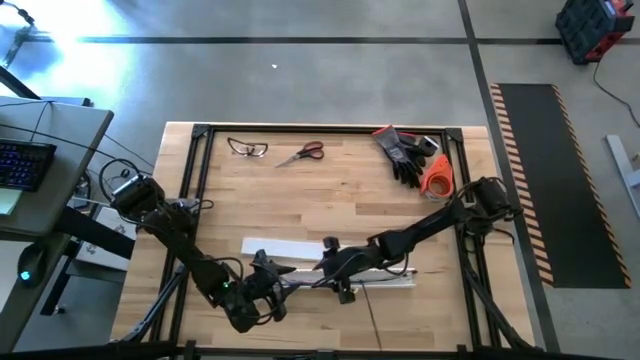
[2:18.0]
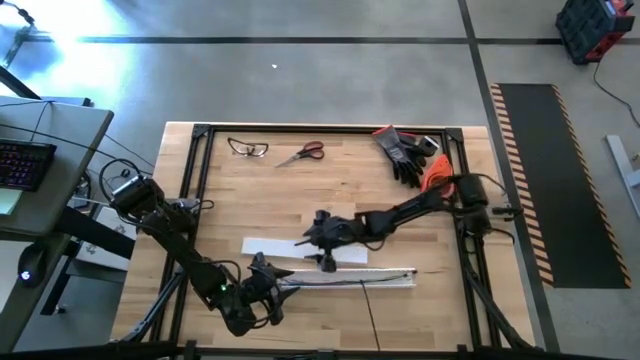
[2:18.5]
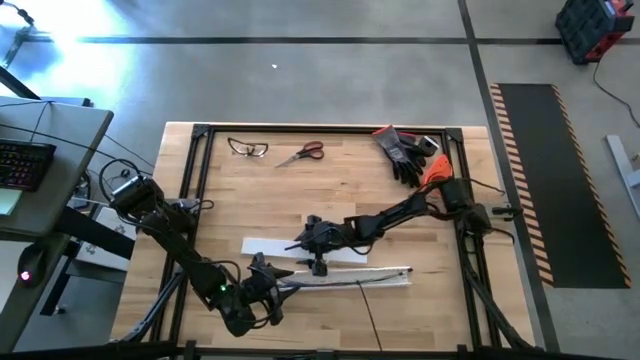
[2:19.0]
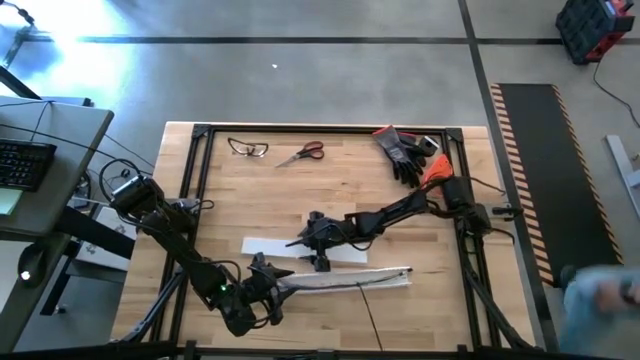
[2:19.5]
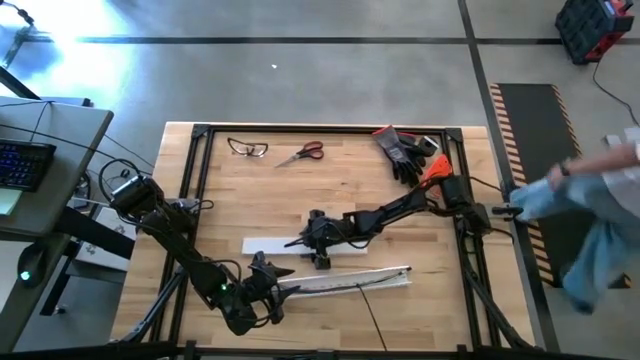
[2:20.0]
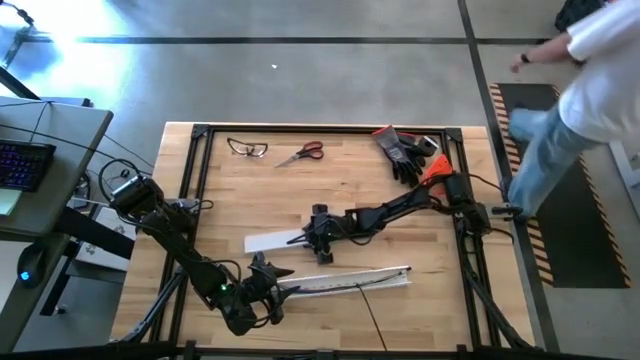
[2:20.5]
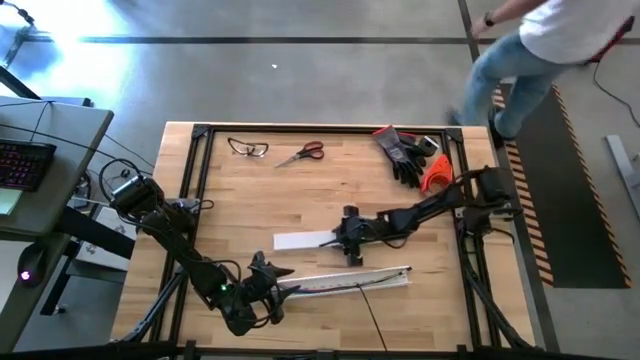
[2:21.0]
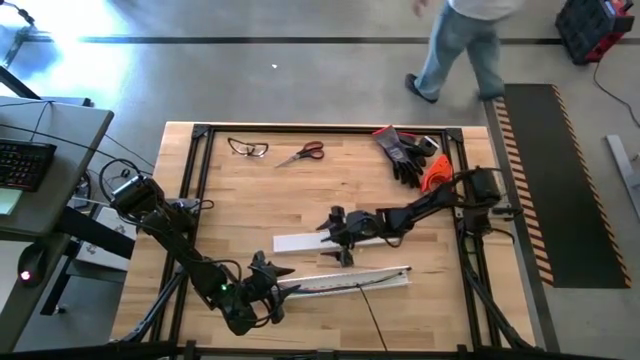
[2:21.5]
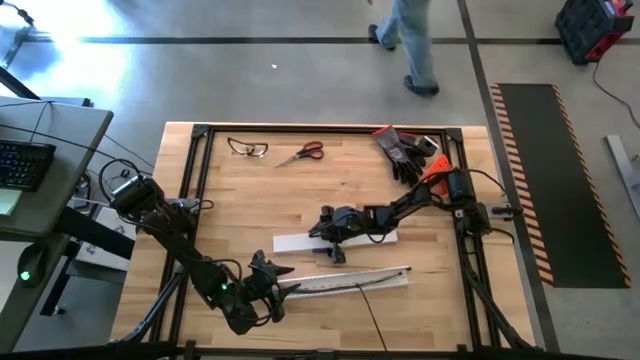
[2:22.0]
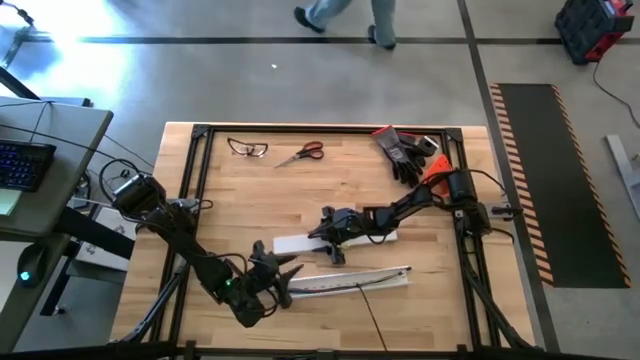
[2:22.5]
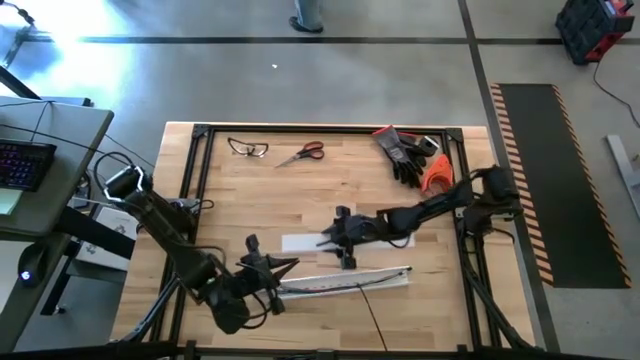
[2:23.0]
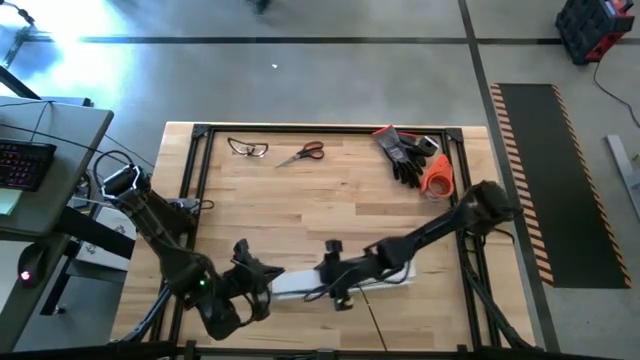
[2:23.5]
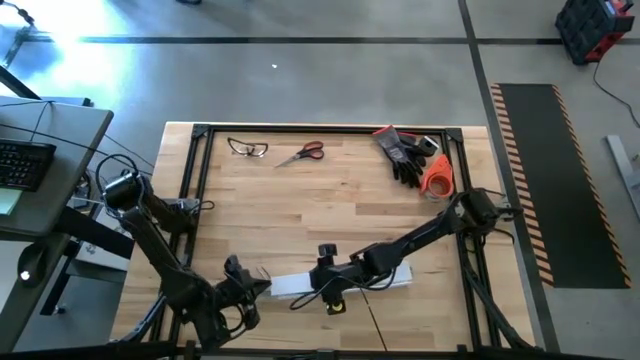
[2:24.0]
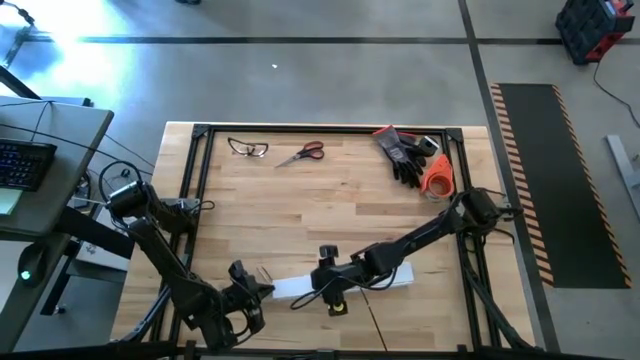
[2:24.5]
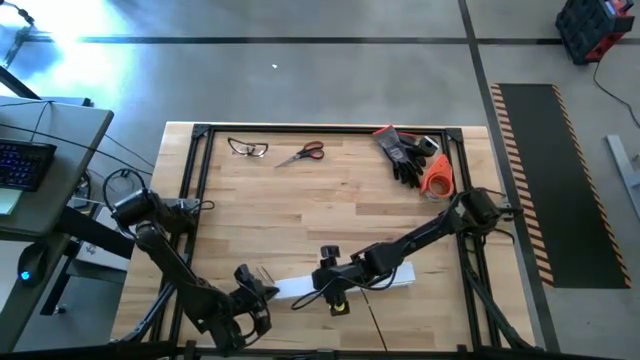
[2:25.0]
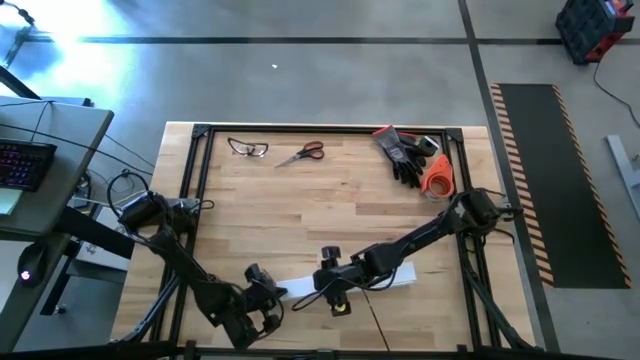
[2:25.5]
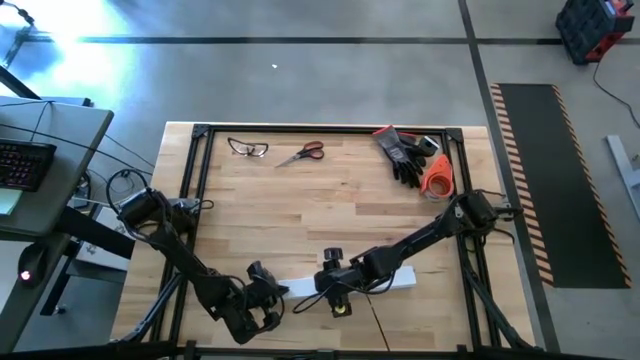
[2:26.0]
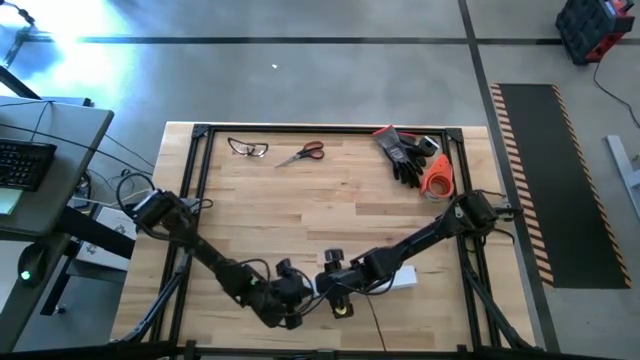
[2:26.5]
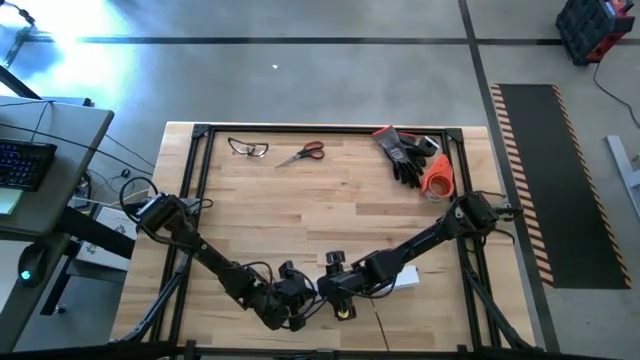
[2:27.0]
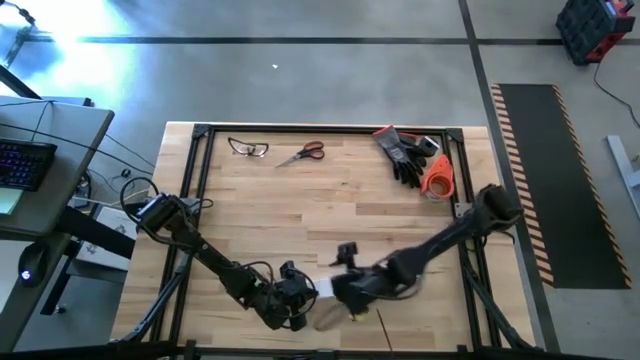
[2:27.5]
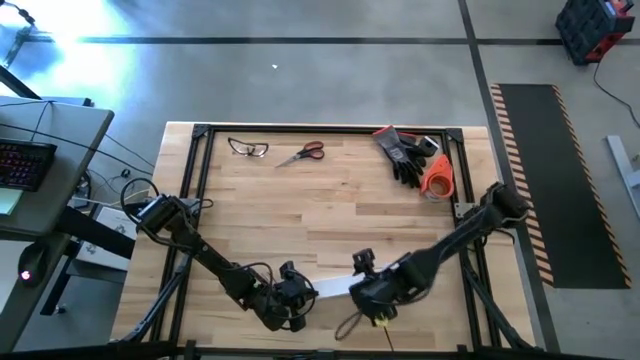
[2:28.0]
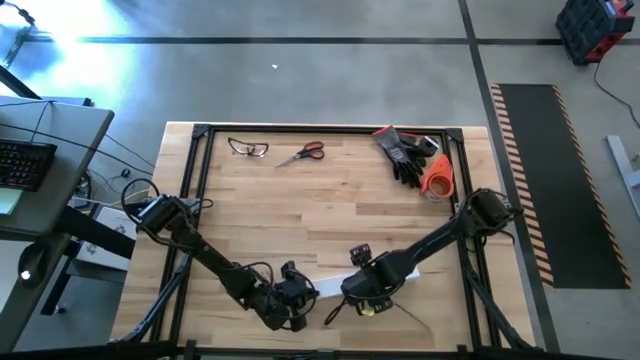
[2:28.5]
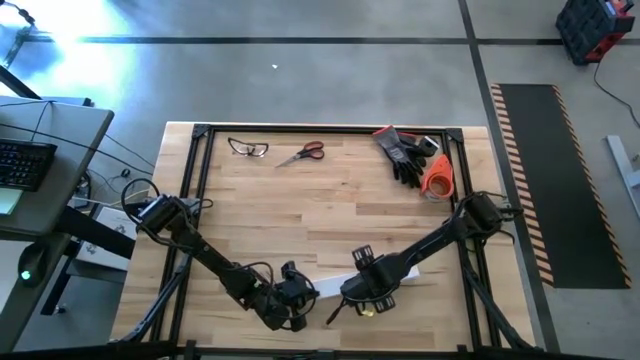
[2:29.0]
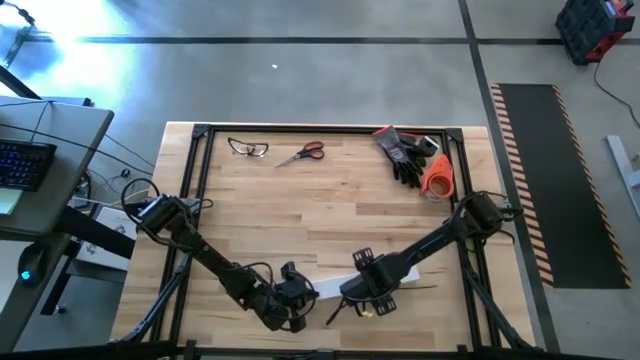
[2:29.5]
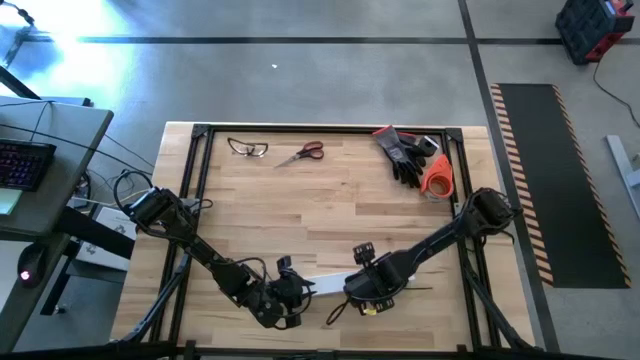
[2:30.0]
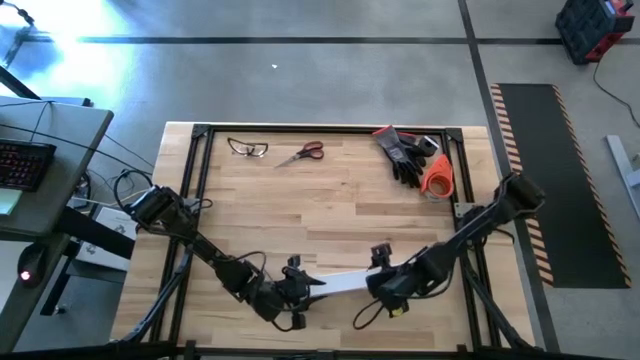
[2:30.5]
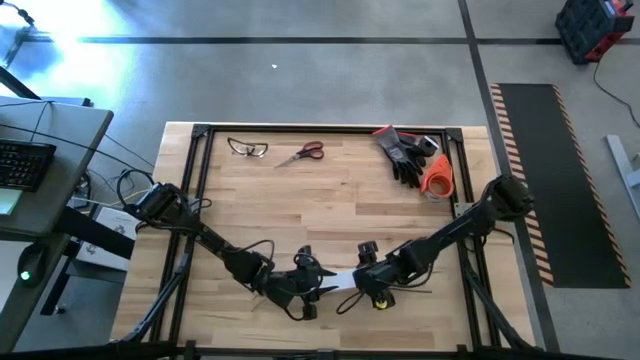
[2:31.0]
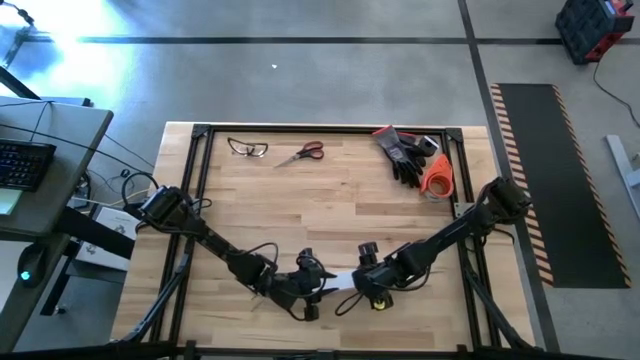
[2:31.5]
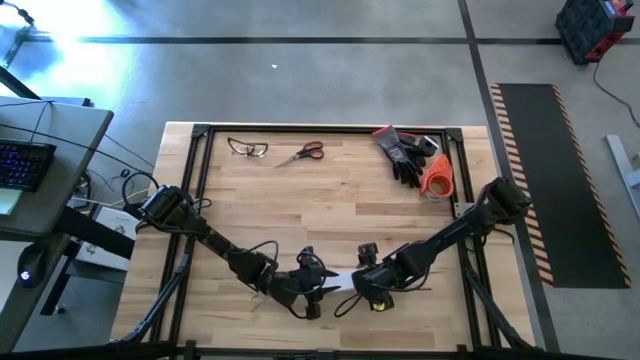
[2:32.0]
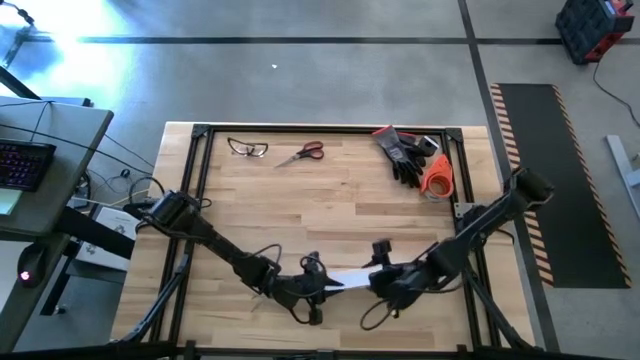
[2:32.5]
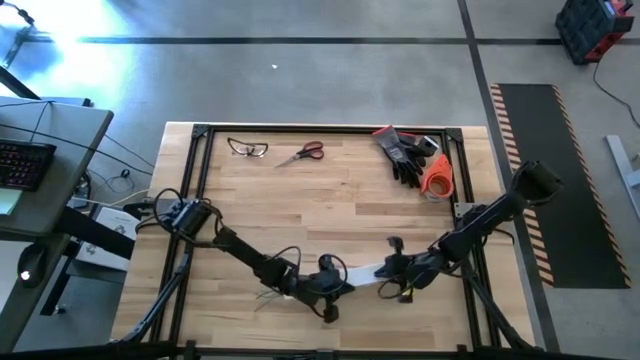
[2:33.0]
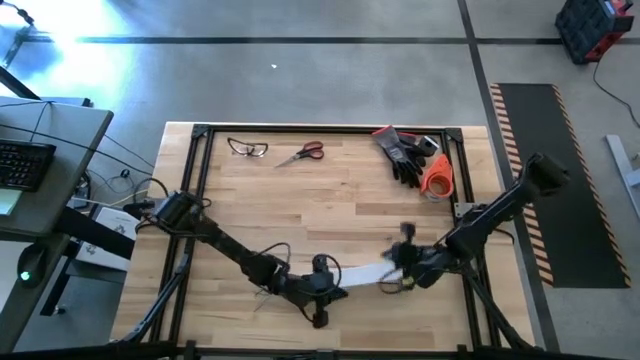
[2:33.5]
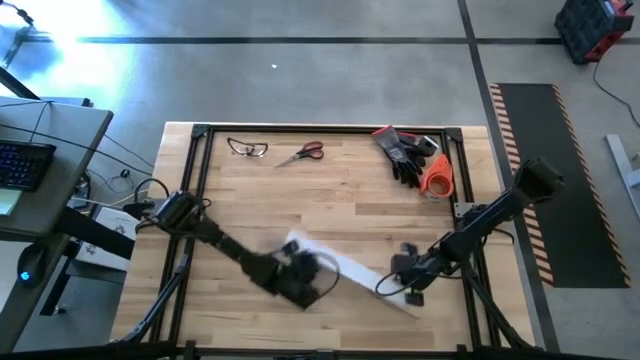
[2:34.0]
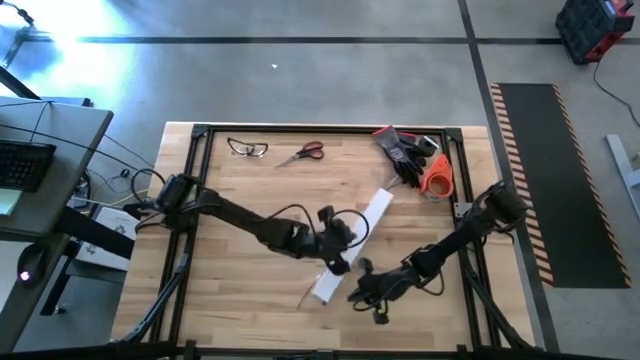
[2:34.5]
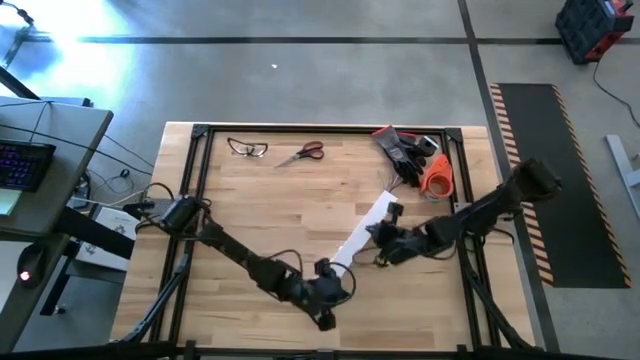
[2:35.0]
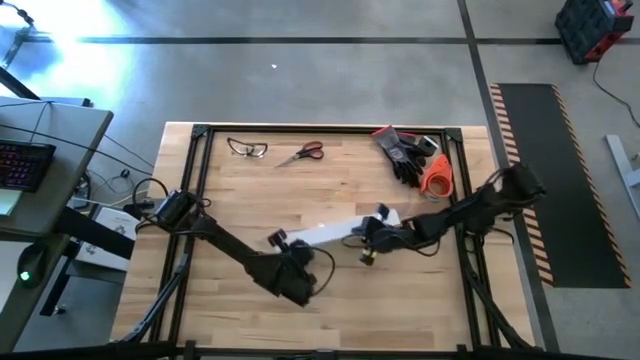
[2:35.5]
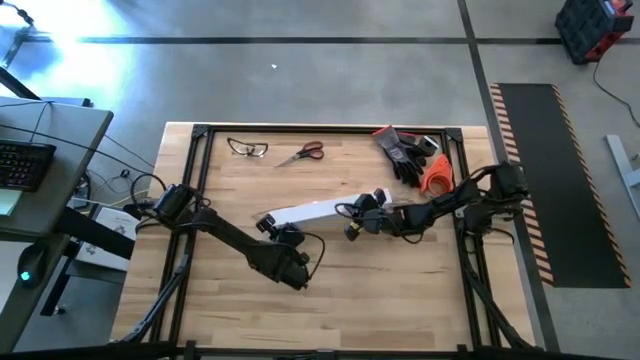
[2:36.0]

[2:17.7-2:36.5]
Task: Ziptie cables
Close the white cable duct lid

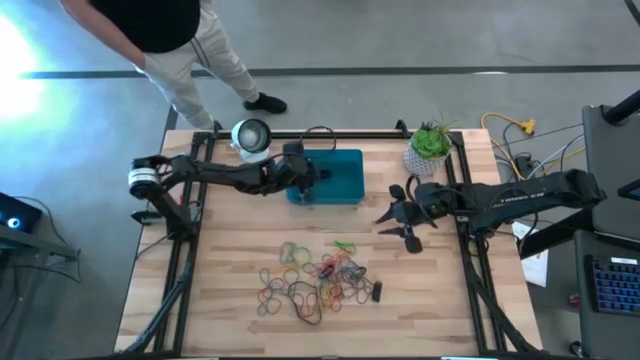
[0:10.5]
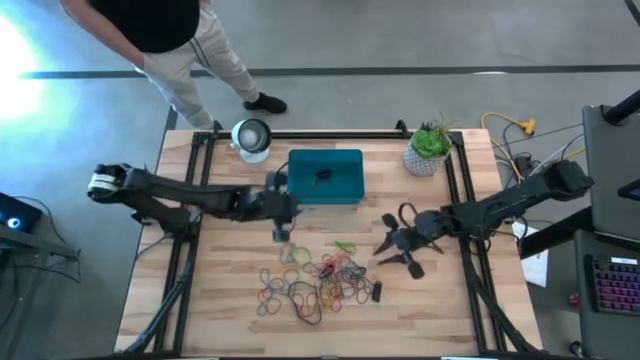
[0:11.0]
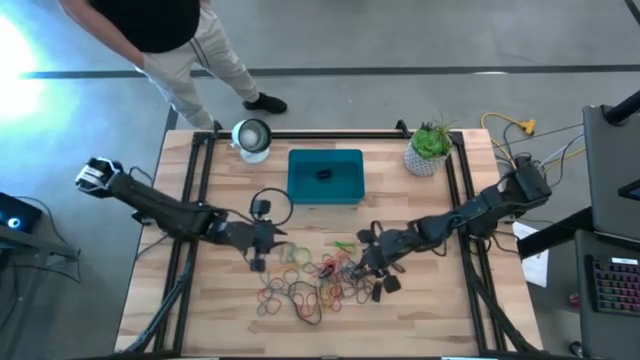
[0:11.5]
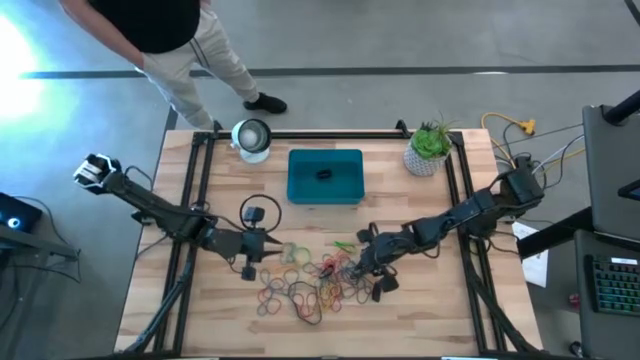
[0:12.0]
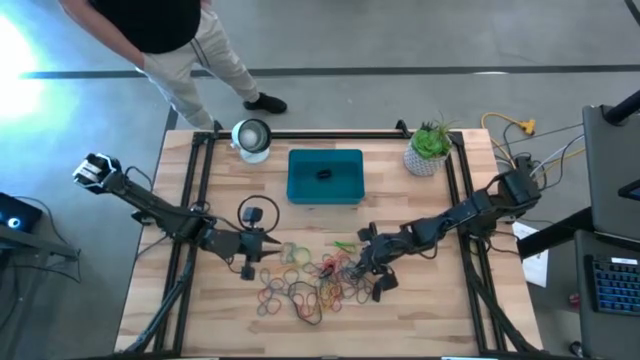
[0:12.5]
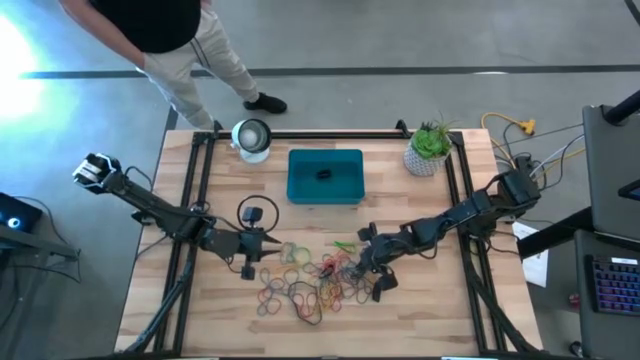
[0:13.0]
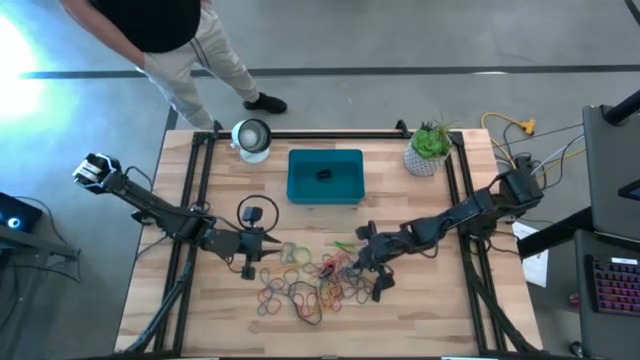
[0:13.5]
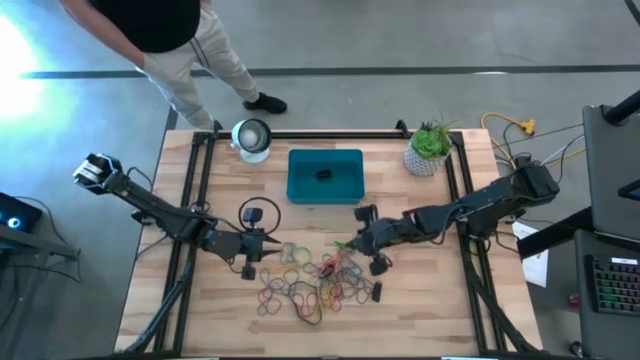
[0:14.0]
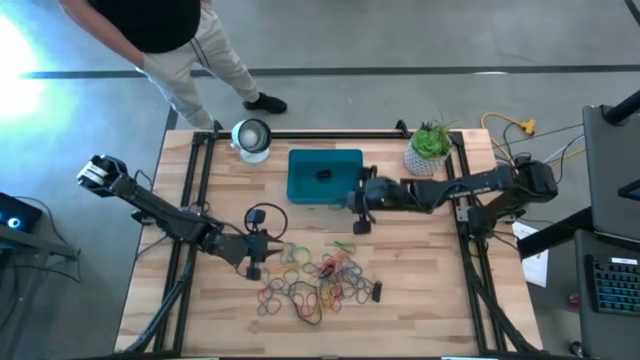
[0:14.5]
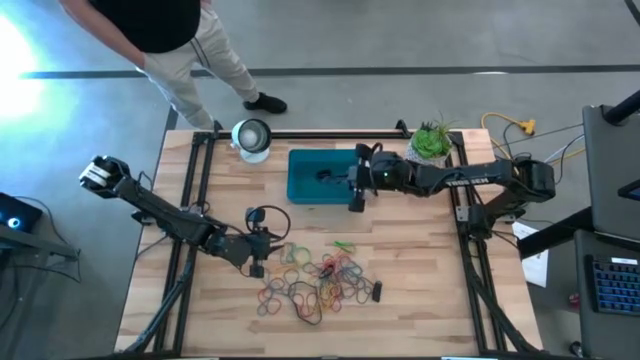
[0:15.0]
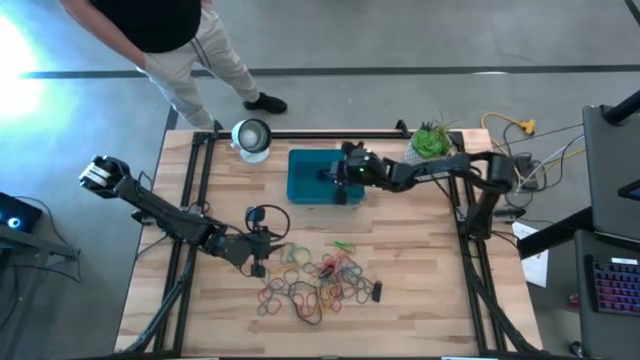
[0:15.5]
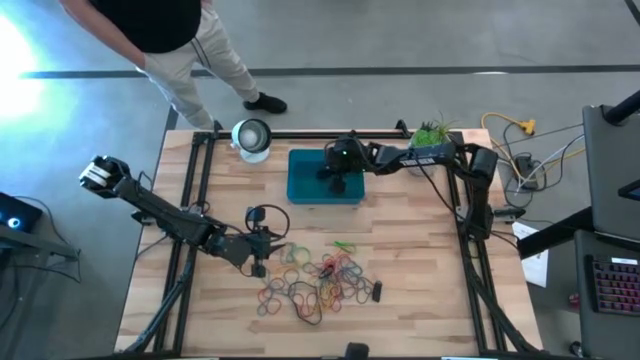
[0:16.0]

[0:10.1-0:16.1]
Task: Pick and place rubber bands into bin
Put the black rubber band into the bin
